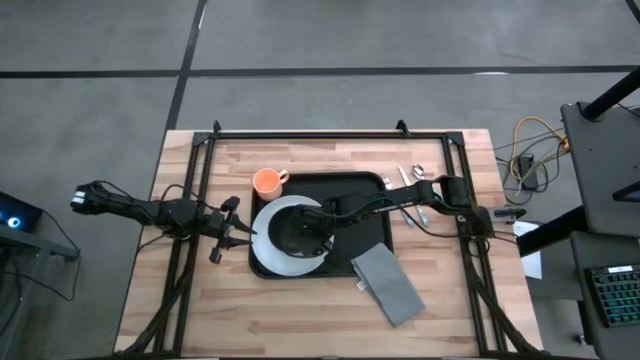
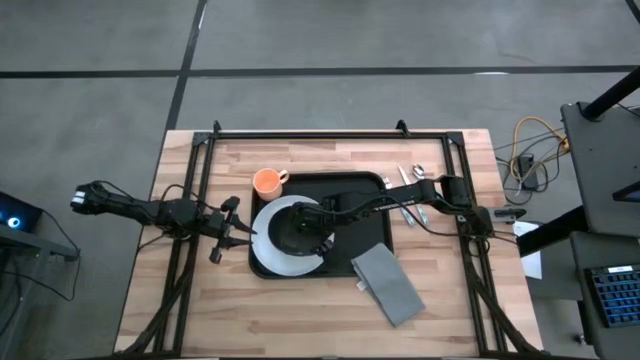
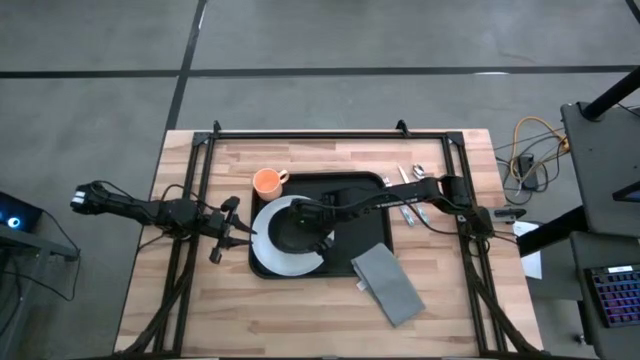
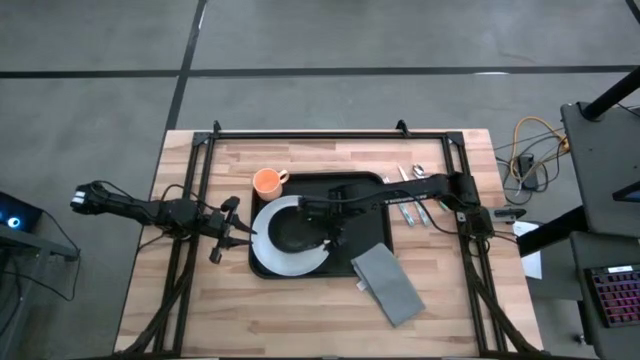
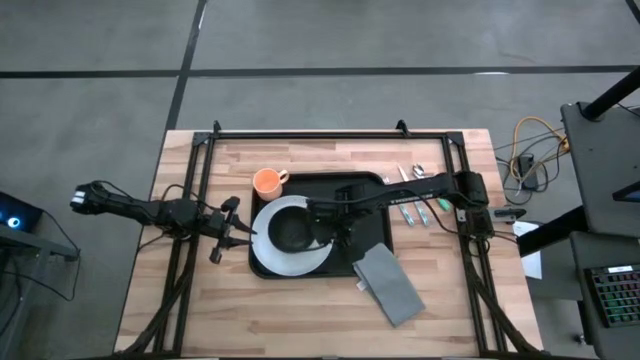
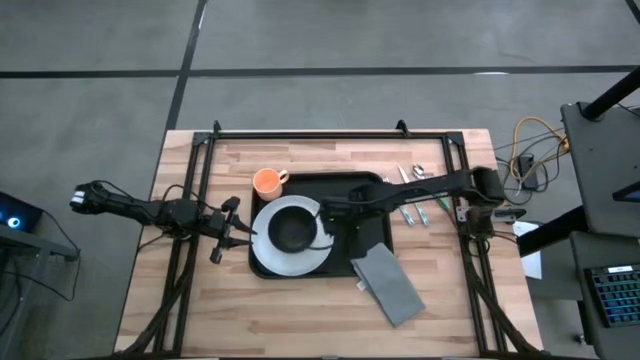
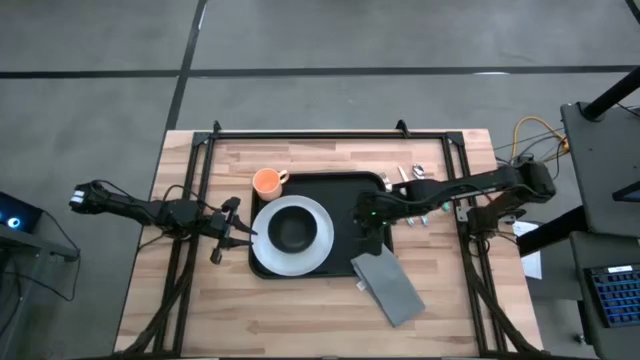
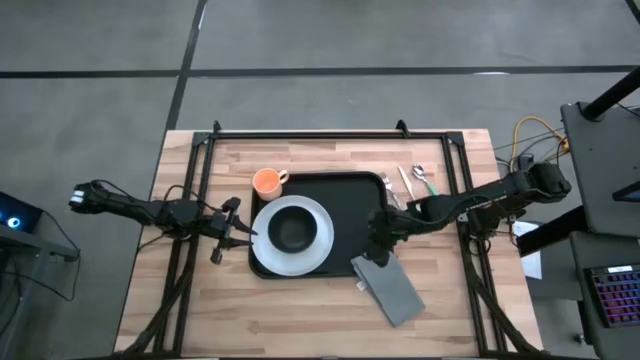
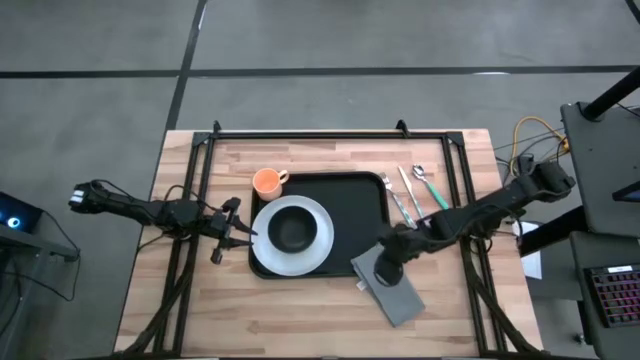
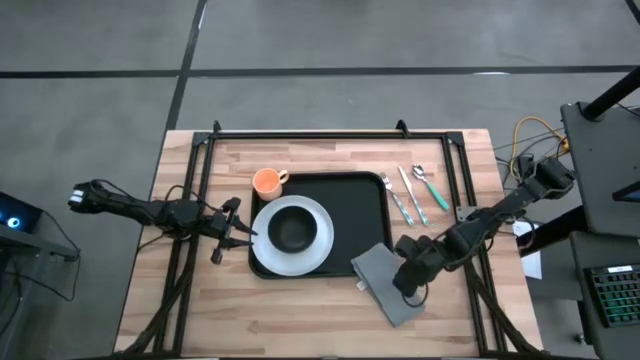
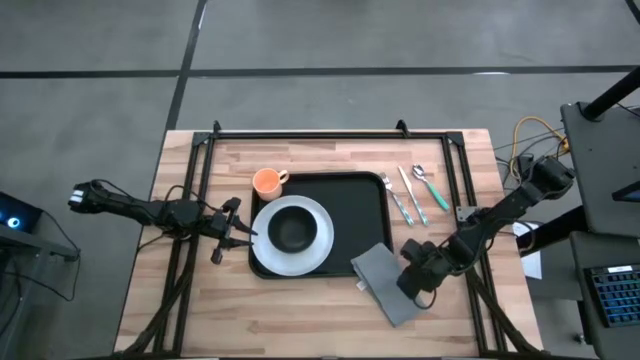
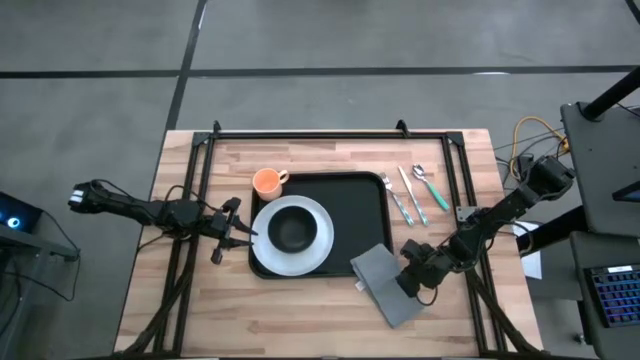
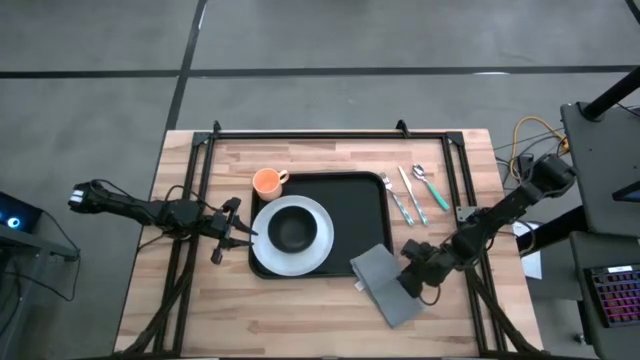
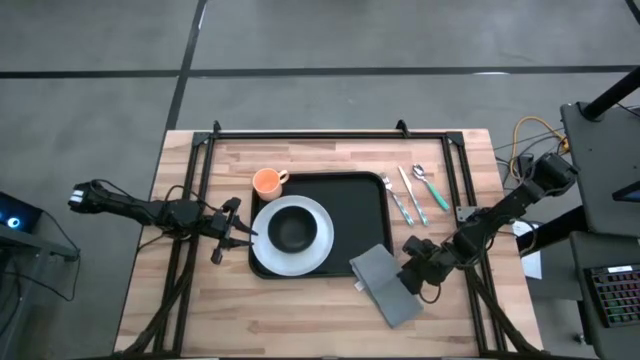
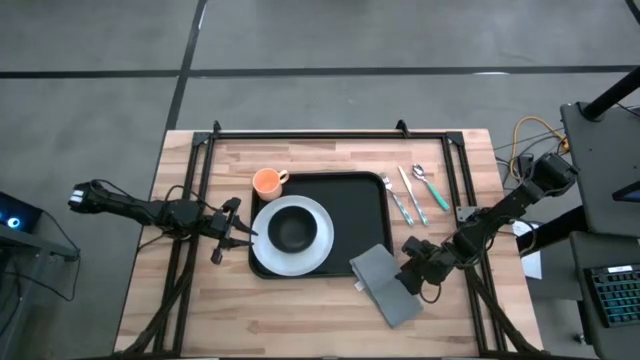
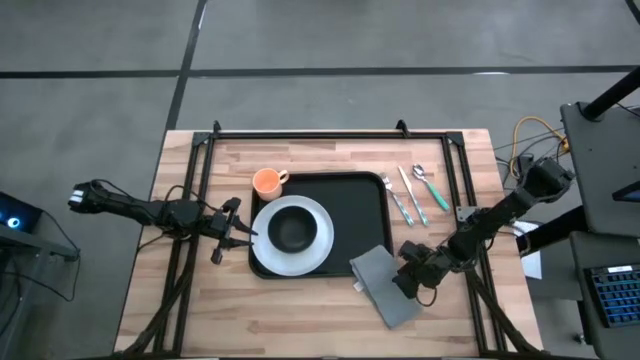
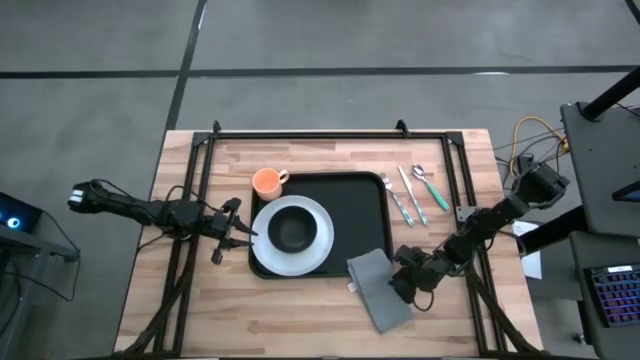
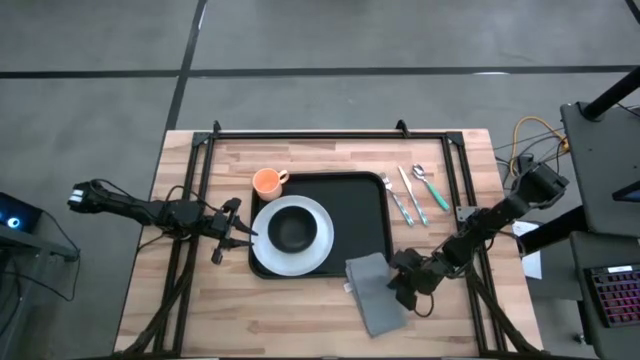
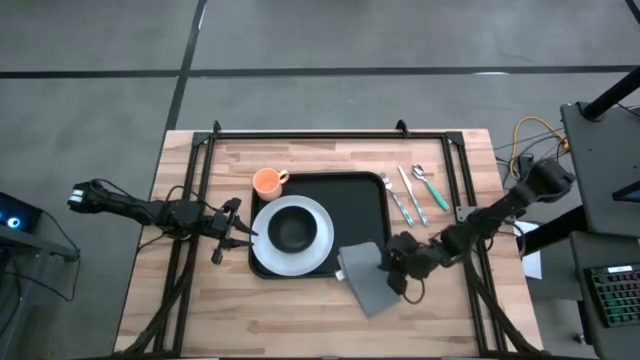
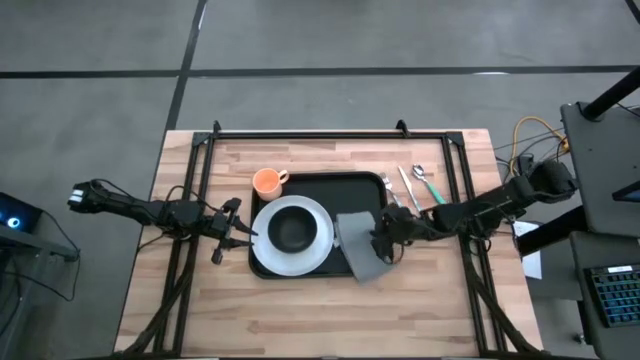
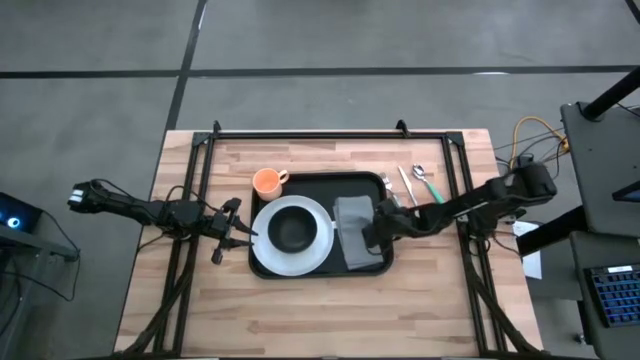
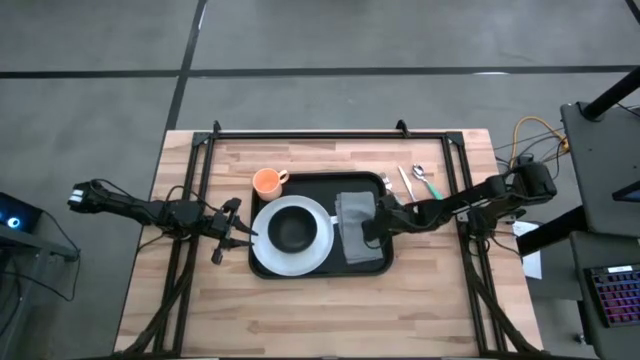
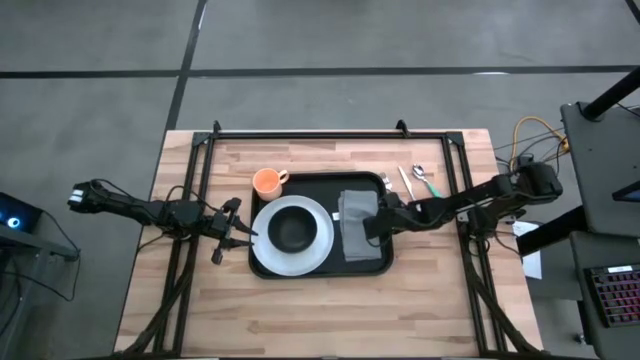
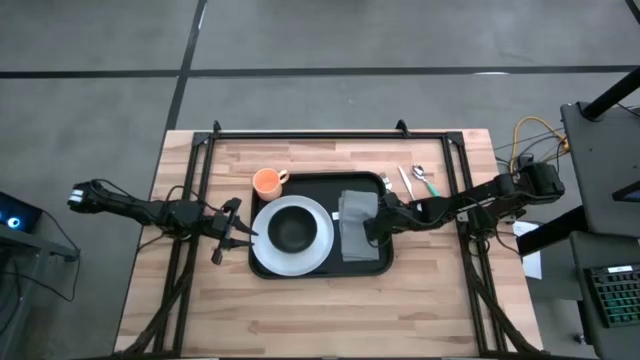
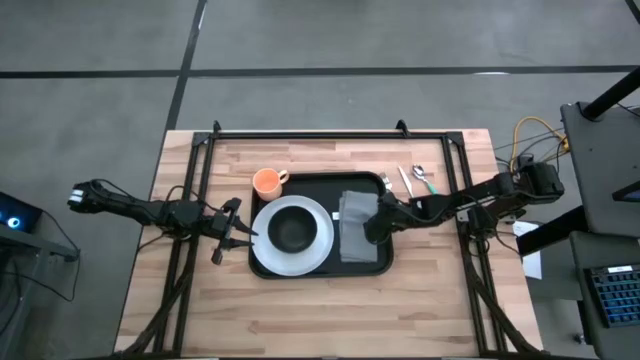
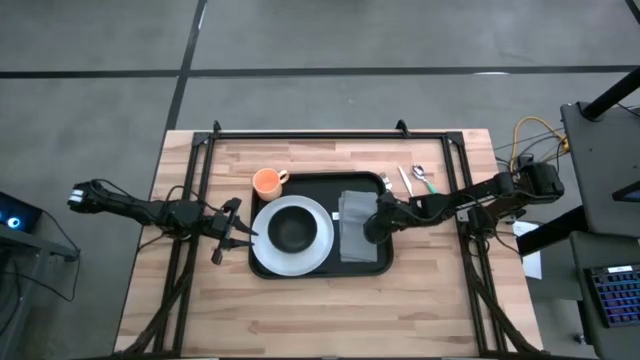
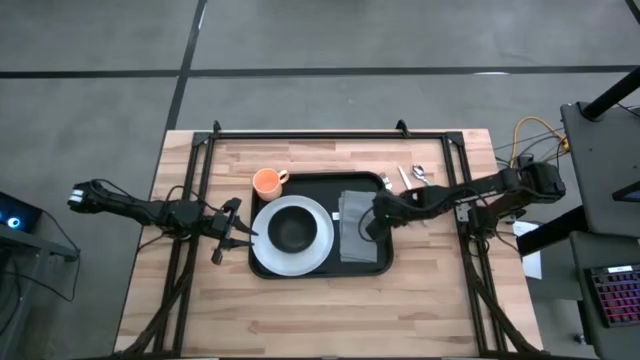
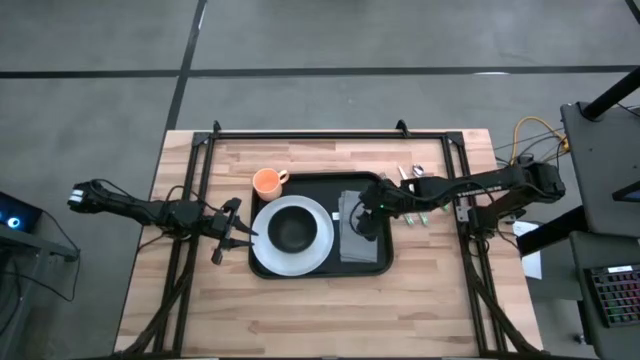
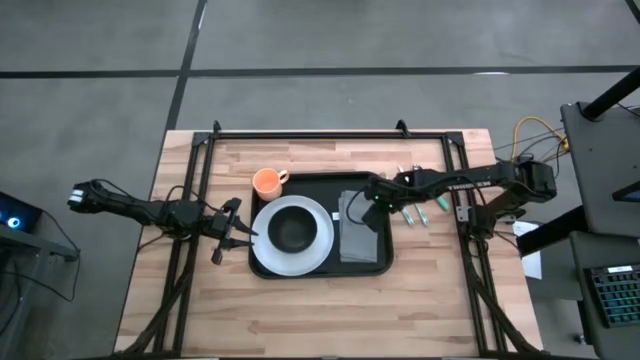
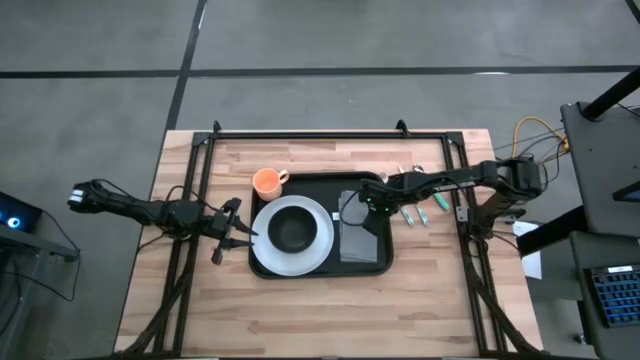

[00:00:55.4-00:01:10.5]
Task: Set up tray
Put the gray napkin to the right of the white plate on the black serving tray

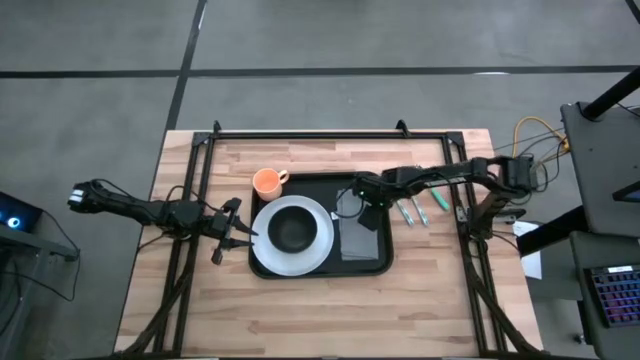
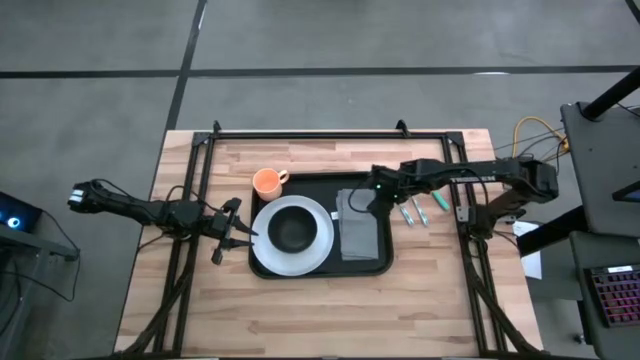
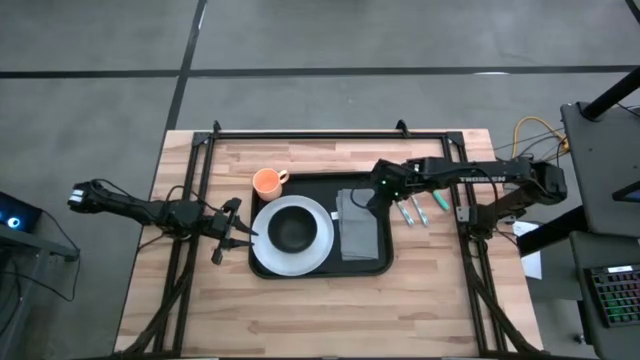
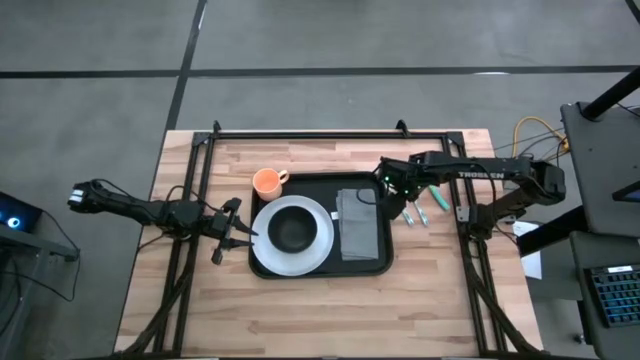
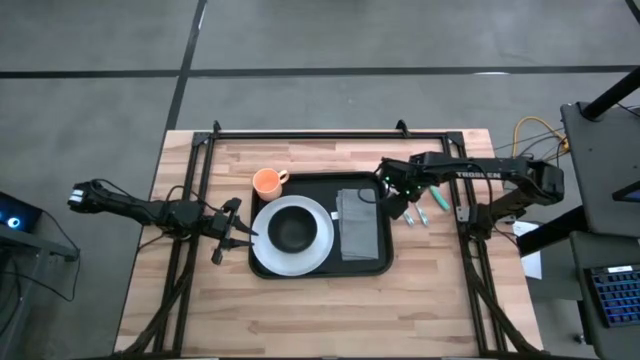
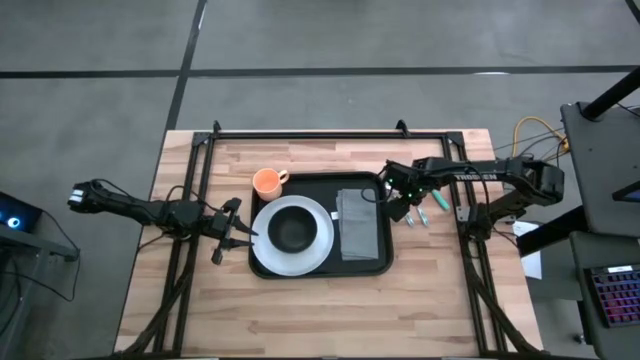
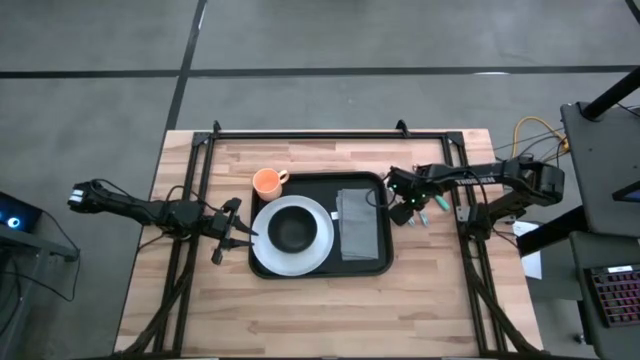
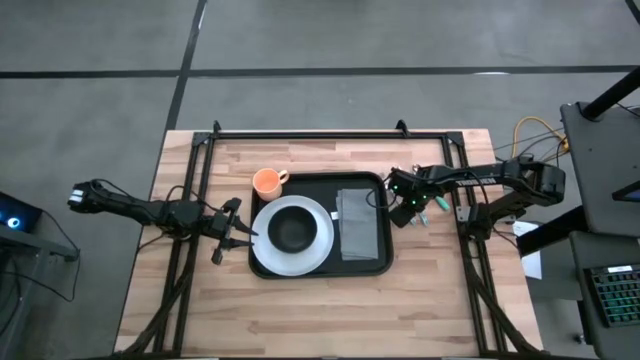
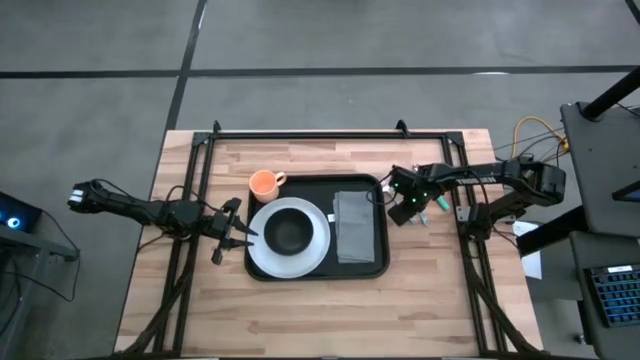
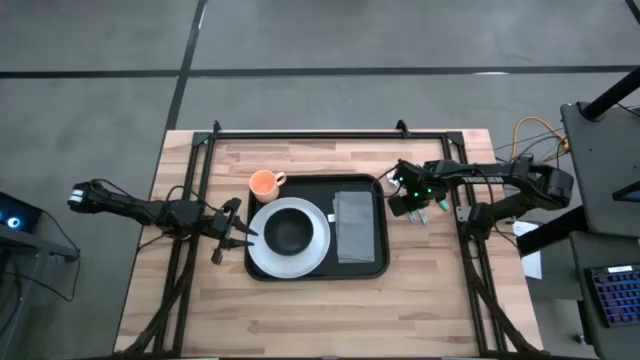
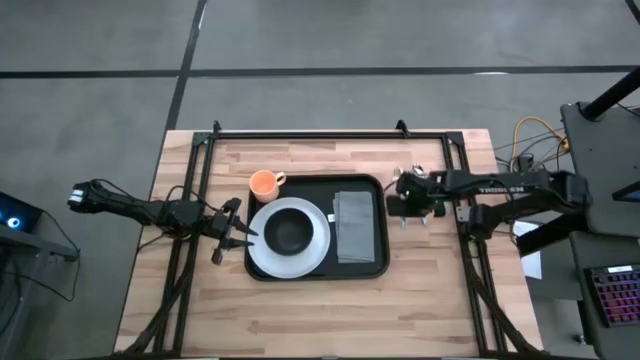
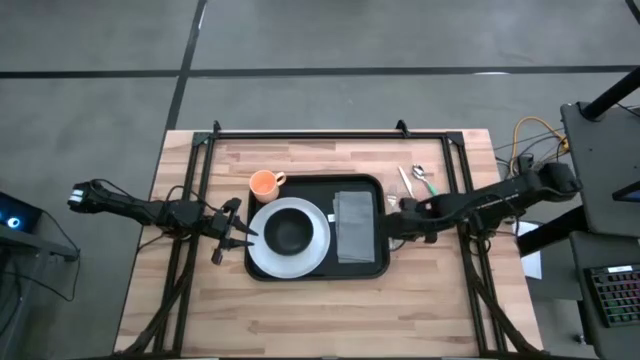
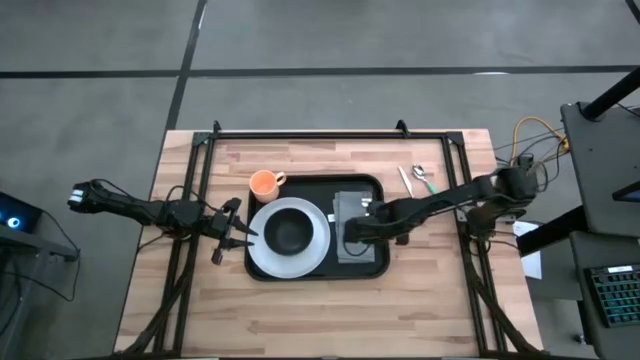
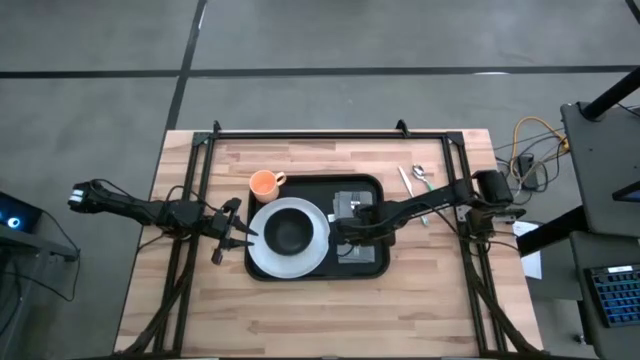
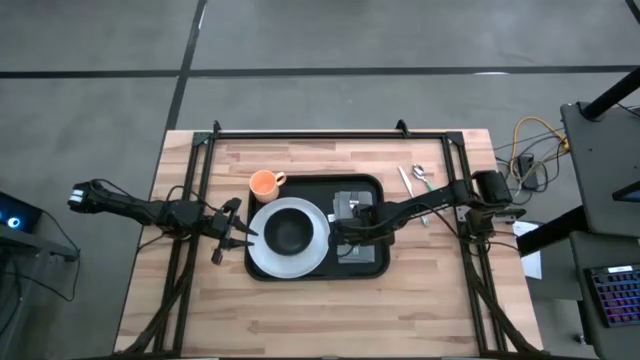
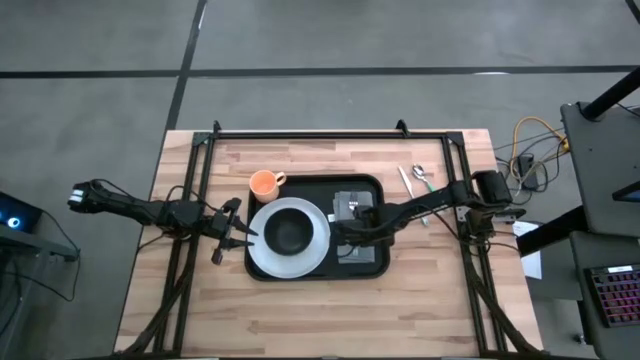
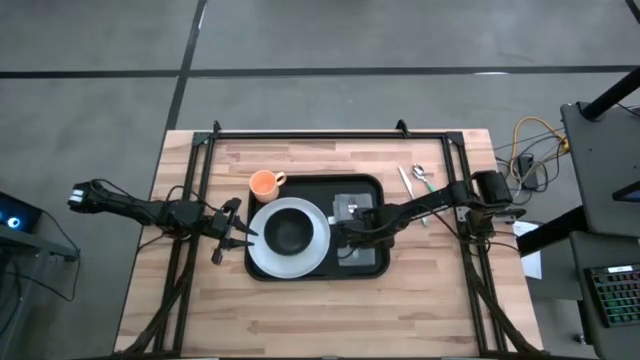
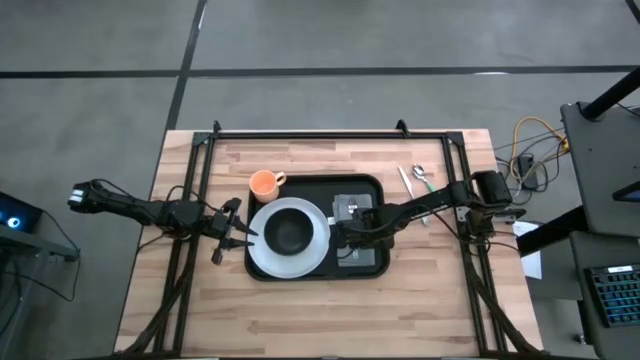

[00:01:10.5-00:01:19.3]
Put the white and blue fork on the gray napkin on the black serving tray
